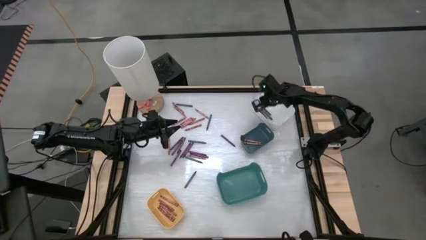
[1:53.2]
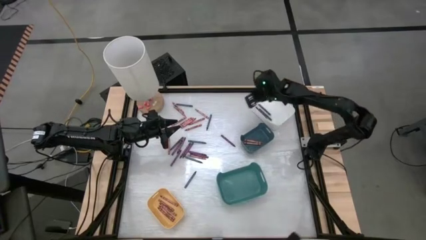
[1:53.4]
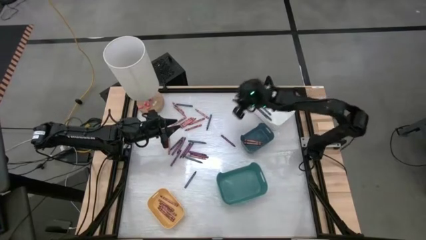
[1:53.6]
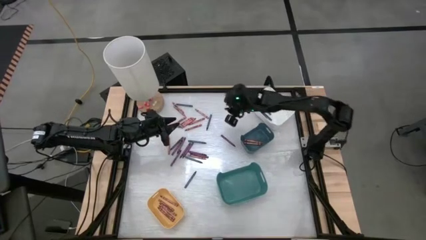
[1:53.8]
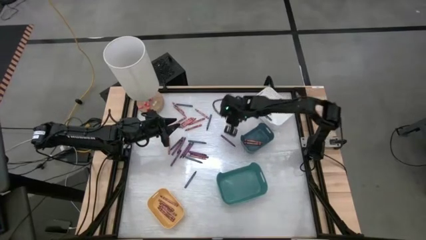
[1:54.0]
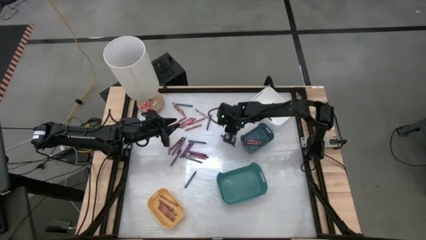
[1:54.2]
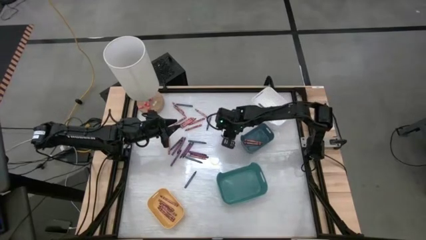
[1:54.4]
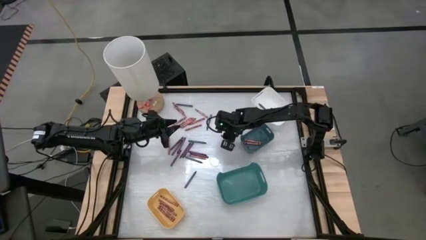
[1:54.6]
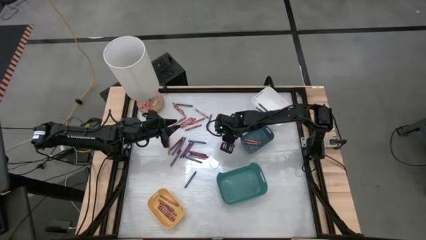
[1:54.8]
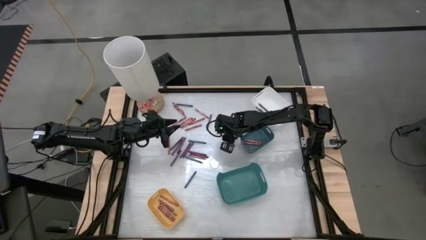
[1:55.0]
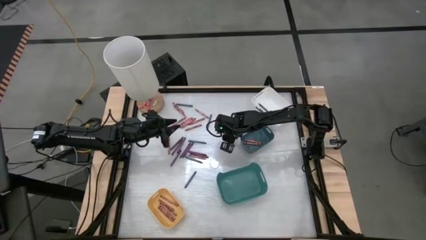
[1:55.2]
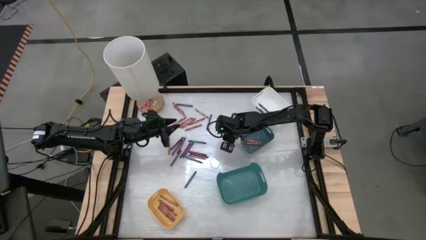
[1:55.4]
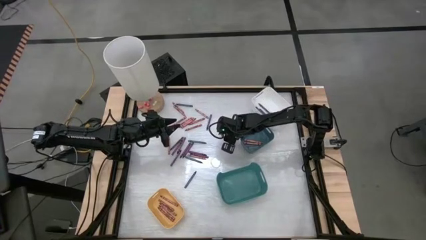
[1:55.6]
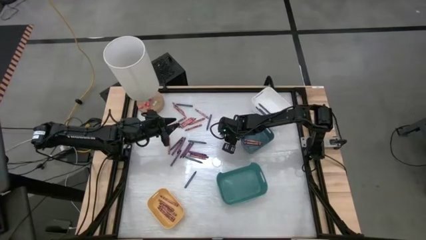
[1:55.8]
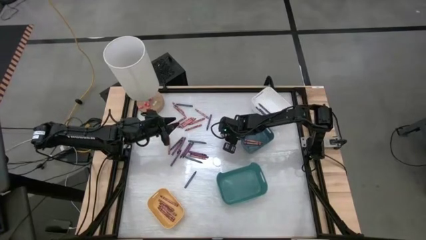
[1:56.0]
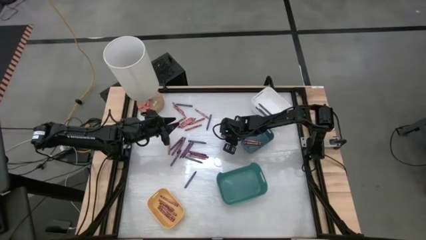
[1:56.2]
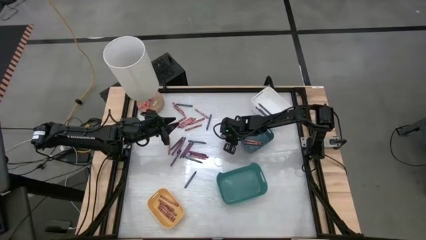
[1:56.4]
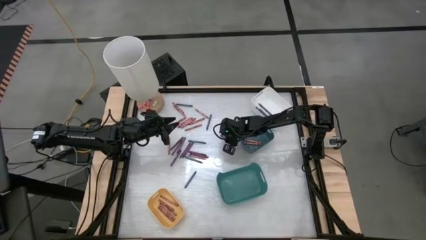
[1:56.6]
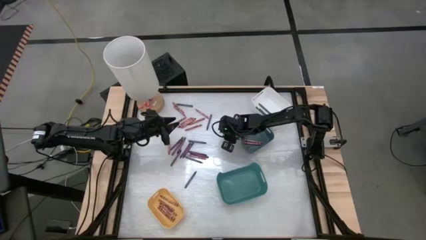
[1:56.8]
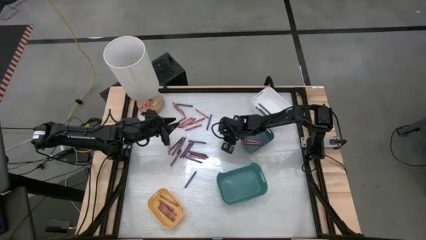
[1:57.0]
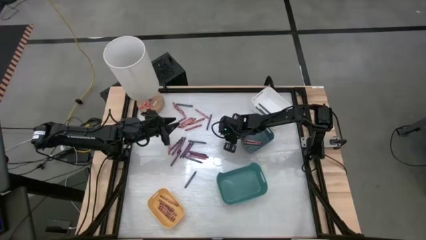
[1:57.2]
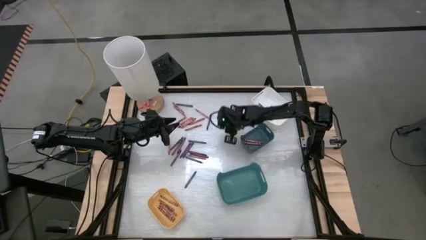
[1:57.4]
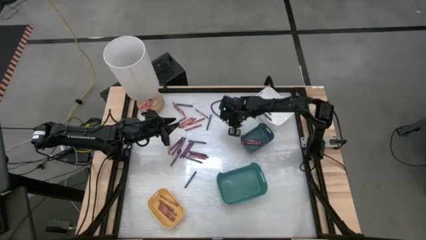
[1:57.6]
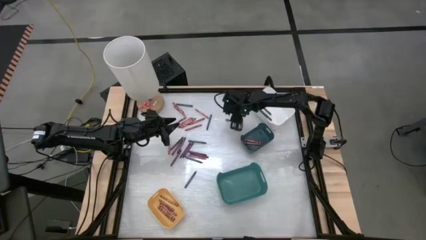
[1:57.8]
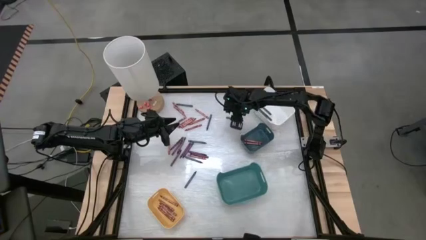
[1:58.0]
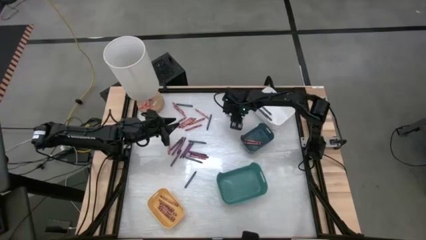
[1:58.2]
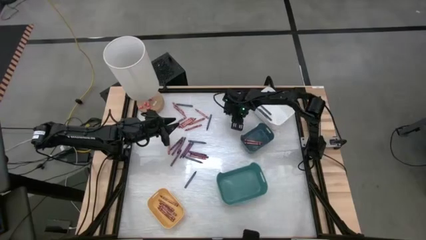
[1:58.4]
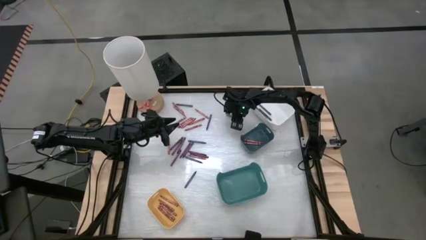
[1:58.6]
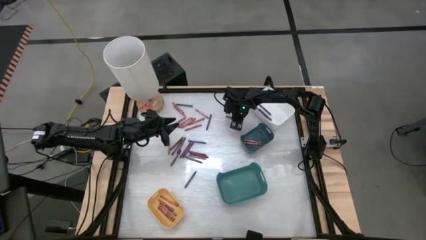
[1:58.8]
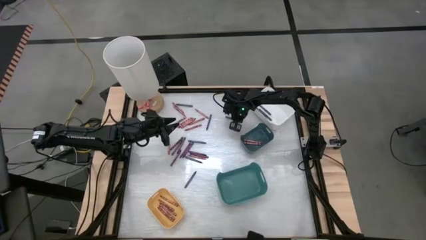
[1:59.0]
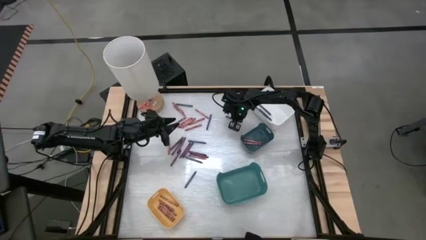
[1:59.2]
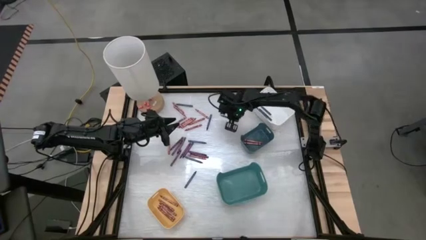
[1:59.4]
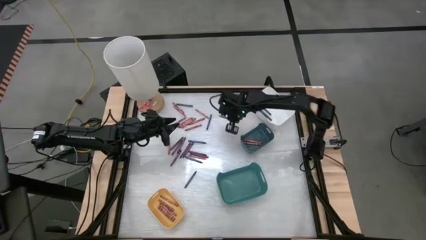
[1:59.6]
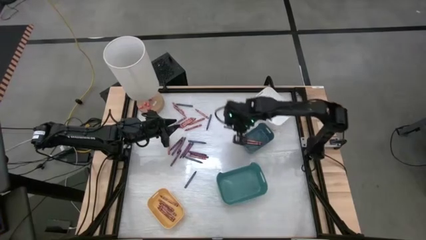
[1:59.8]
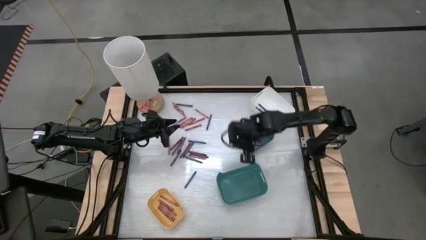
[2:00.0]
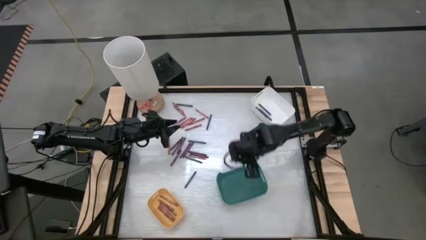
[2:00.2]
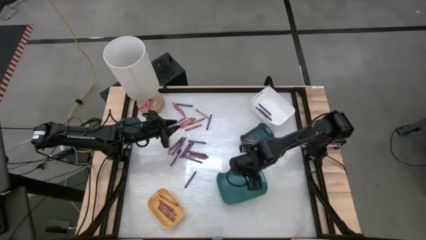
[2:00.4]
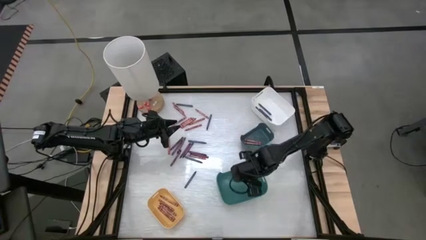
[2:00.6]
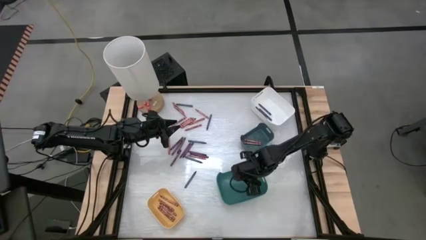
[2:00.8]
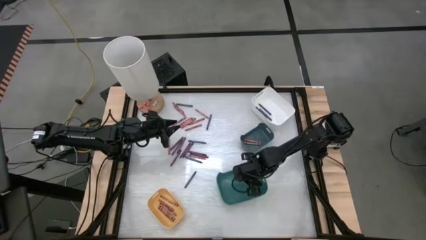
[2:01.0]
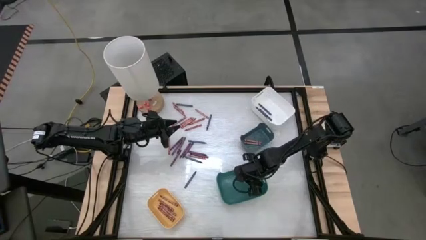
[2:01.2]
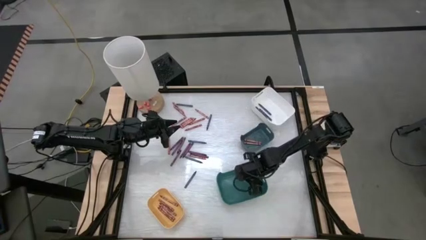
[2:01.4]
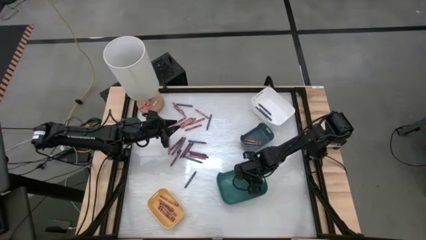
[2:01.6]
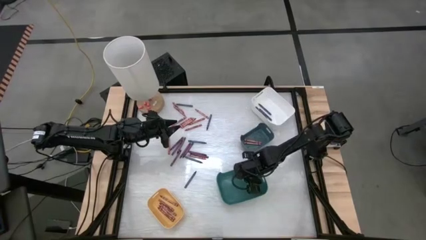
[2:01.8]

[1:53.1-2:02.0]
Task: Sort crayons
Put the purple crayon into the blue bin

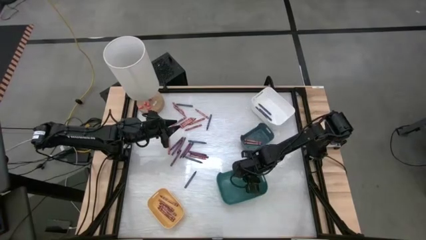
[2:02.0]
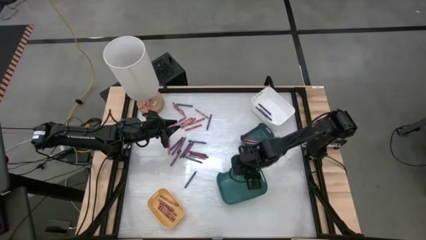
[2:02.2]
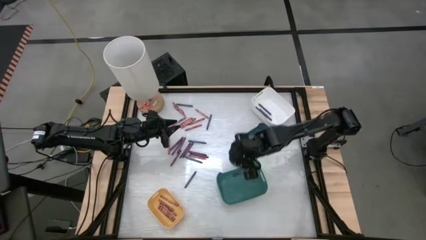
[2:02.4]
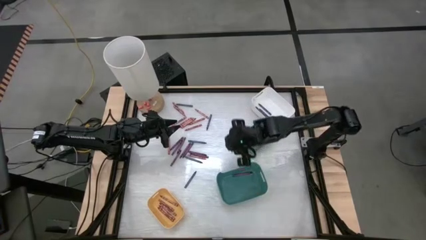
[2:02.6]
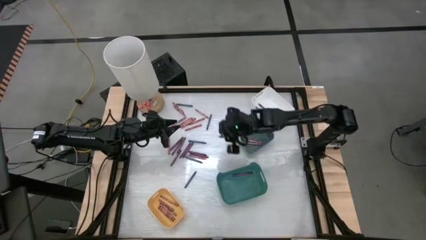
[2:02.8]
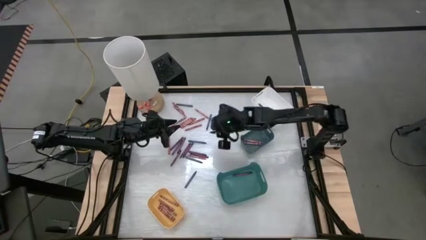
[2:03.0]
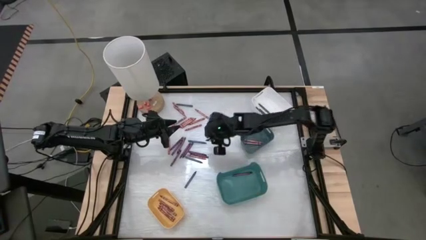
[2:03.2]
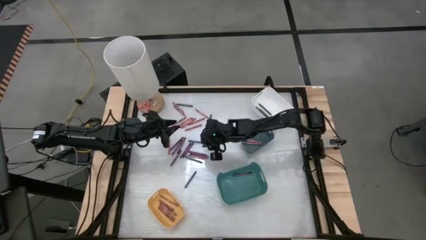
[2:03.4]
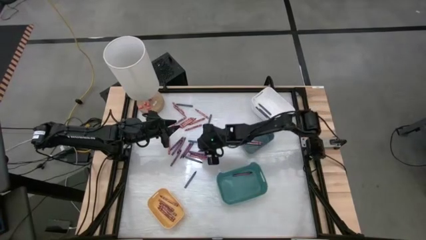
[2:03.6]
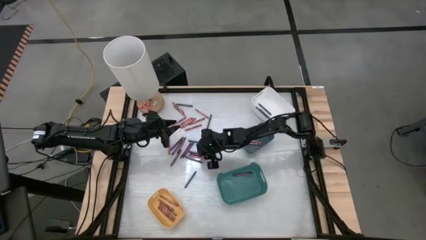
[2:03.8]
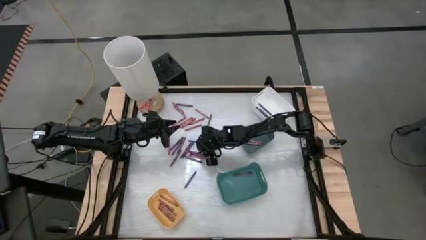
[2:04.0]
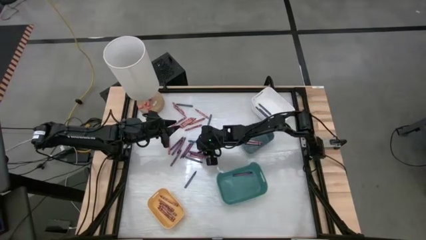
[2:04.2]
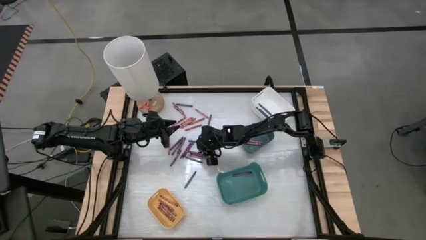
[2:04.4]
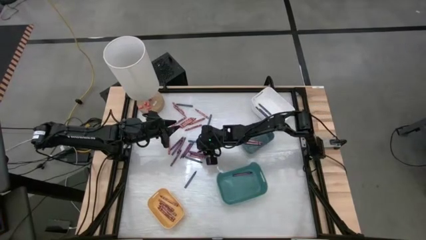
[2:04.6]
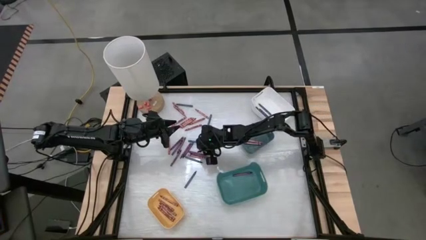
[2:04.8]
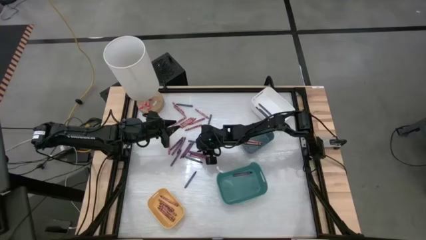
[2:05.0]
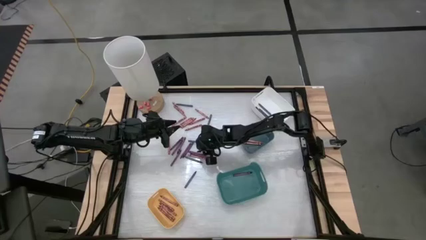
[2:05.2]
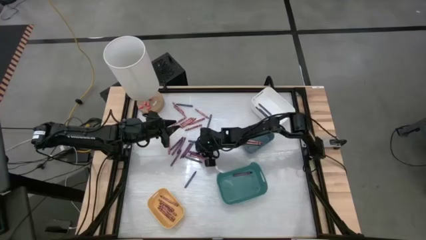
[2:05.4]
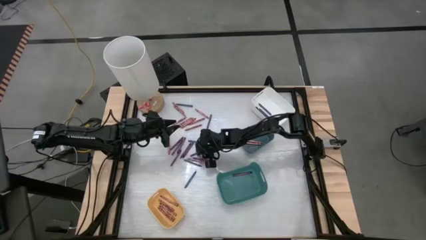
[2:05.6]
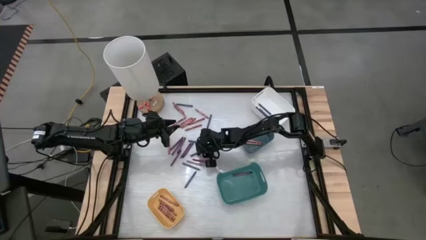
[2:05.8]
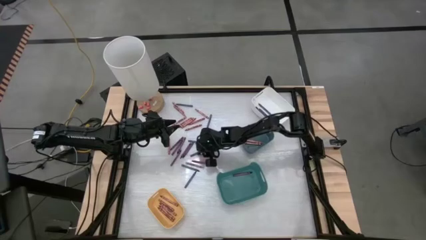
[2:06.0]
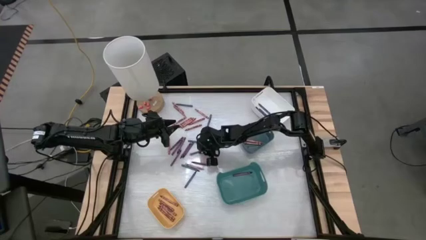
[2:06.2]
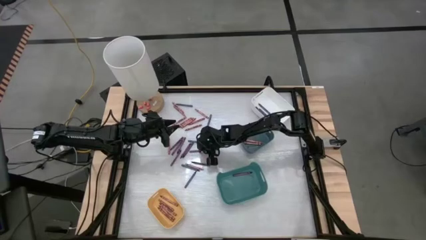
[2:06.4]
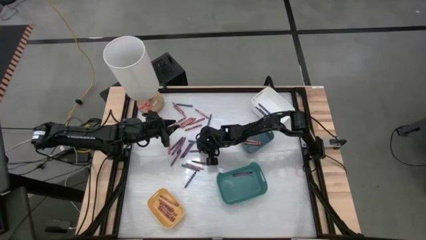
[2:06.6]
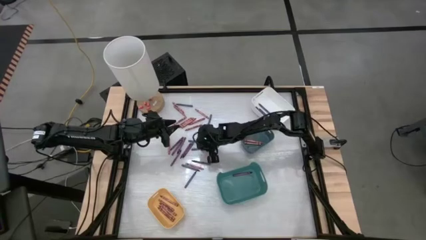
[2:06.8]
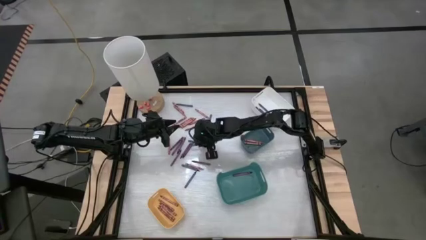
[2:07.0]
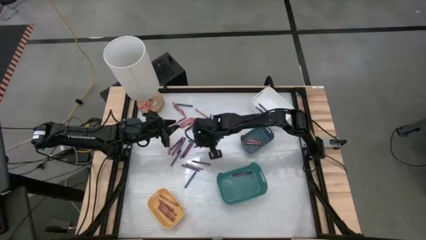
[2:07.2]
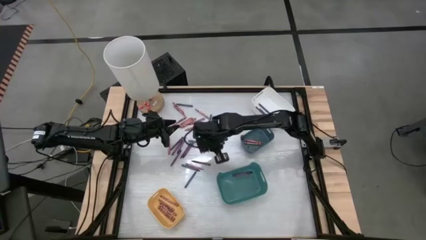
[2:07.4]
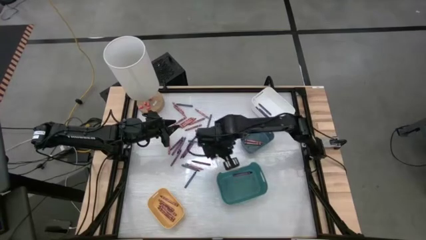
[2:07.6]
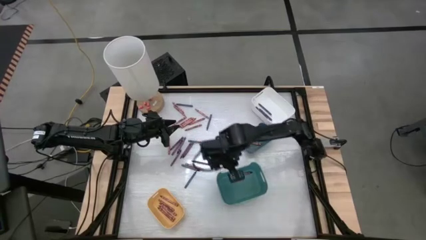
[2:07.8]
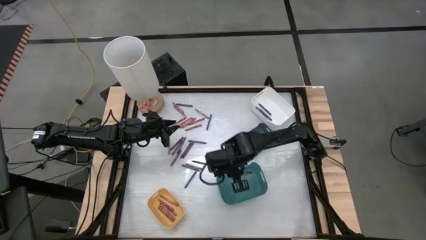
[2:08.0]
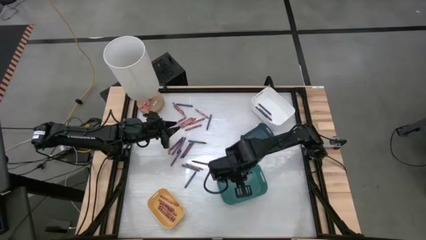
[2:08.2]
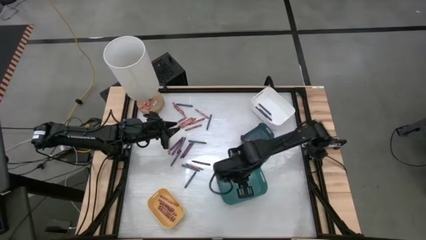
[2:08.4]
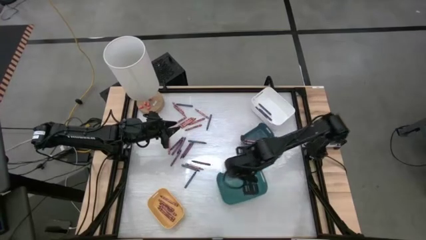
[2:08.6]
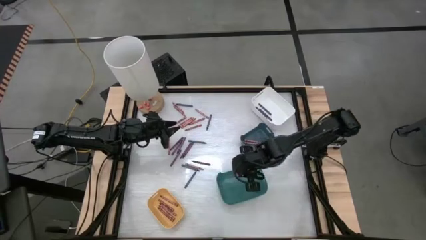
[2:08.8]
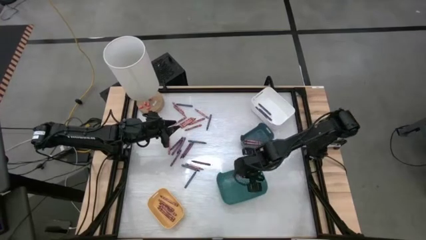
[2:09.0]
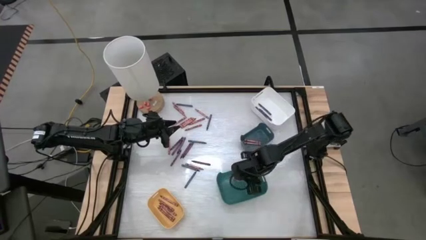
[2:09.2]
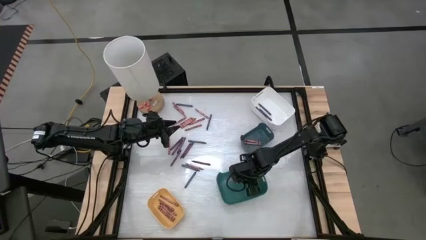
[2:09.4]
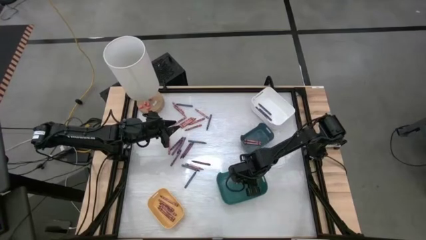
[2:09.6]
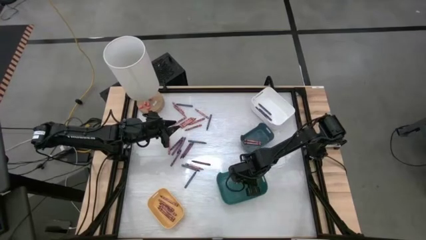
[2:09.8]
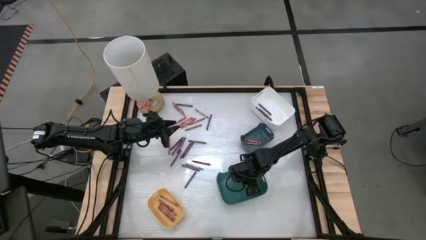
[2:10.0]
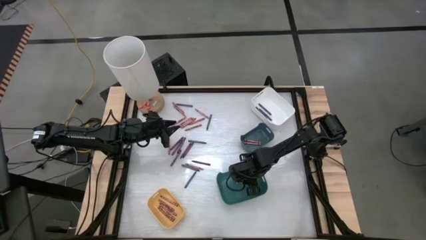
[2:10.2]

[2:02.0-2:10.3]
Put the purple crayon into the blue bin

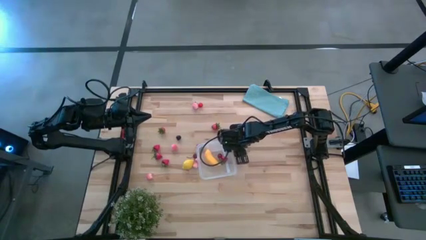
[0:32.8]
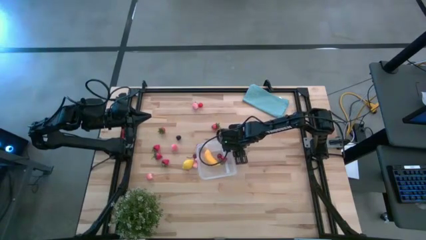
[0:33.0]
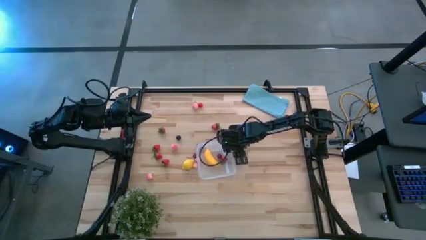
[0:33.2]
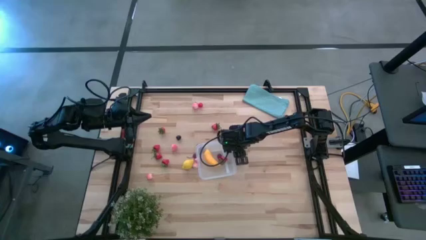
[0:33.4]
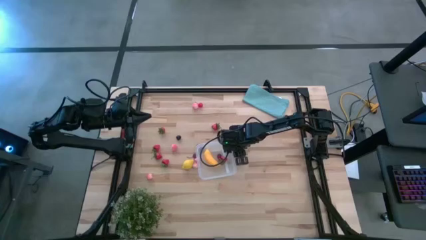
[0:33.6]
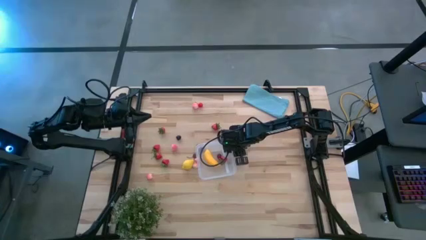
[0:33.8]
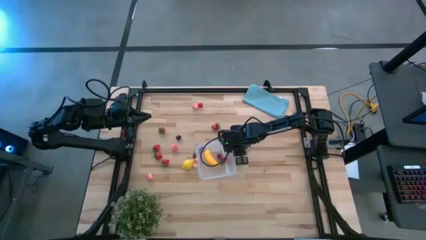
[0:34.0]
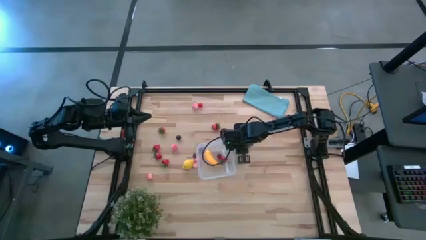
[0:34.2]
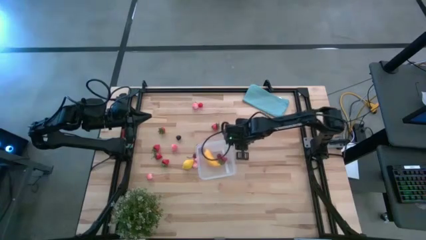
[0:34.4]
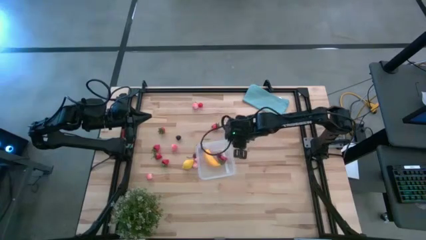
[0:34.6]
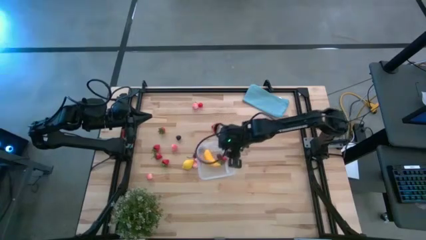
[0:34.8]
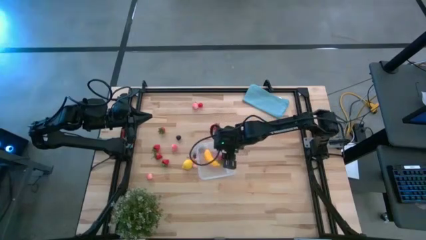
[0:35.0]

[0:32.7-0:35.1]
Task: Pick and placing Produce into tupperware
Put the pink peach into the transparent bin
